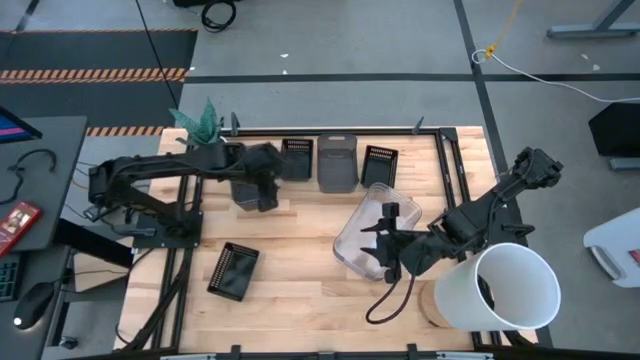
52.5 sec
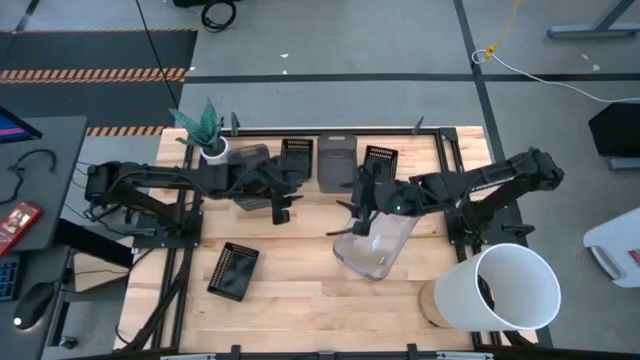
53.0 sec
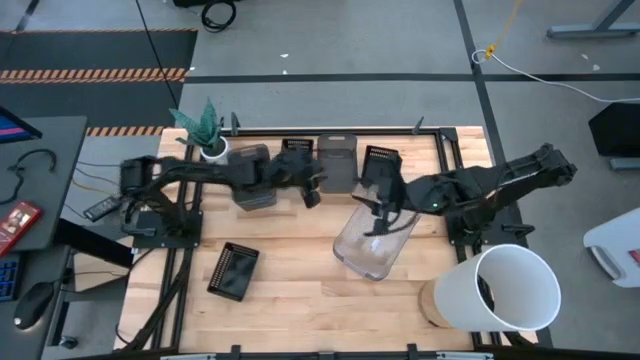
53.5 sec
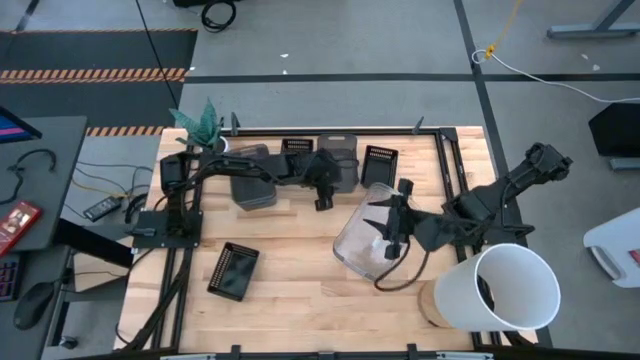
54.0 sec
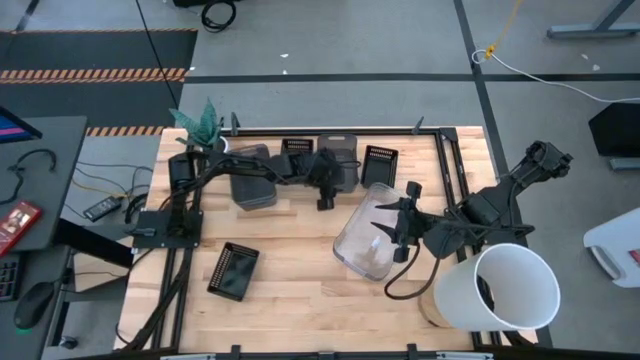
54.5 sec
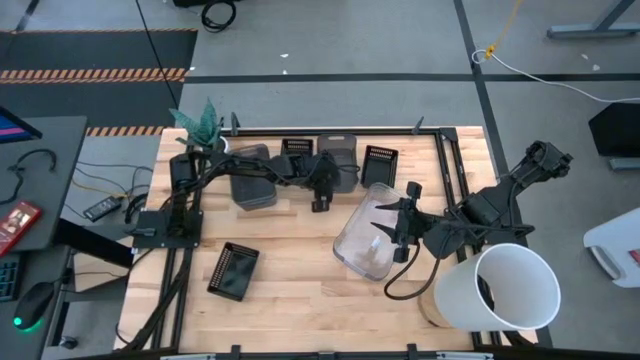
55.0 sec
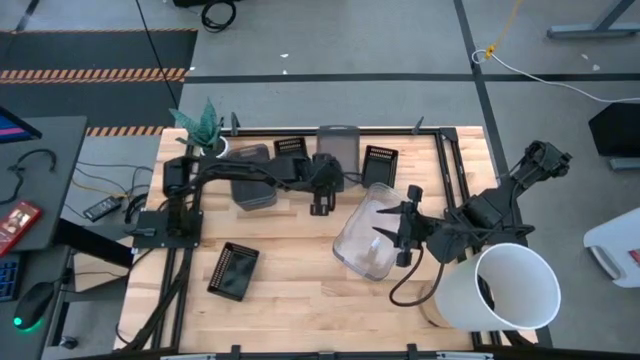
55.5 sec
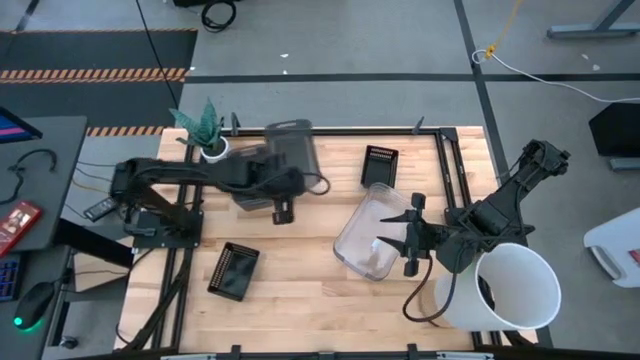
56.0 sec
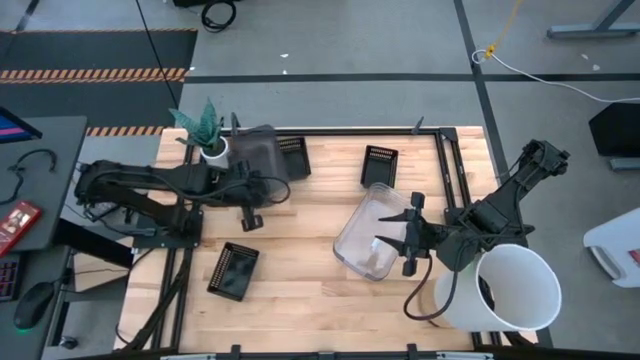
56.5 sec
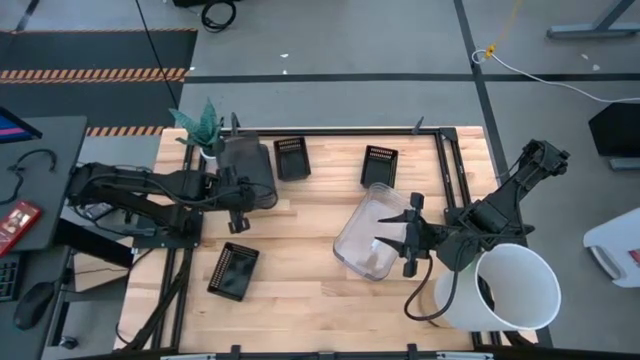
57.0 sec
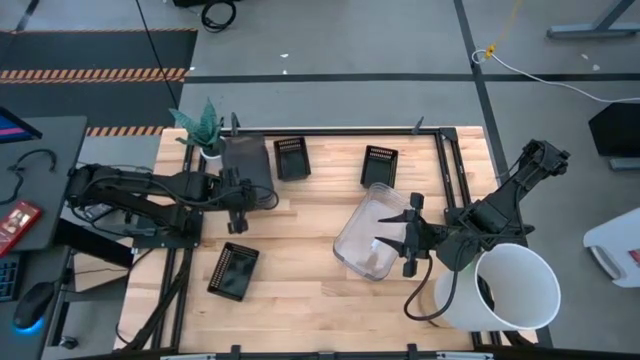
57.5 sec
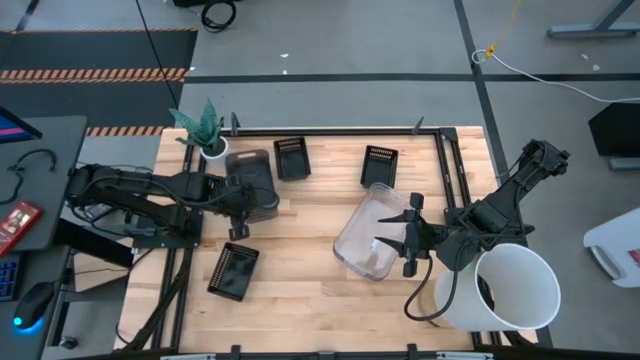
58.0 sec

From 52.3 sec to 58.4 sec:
Stack the right gray bin on the left stacked gray bins

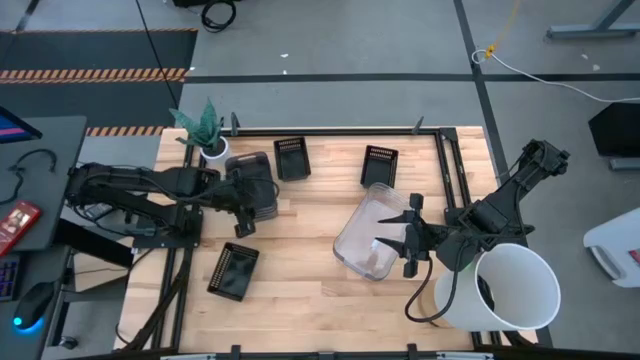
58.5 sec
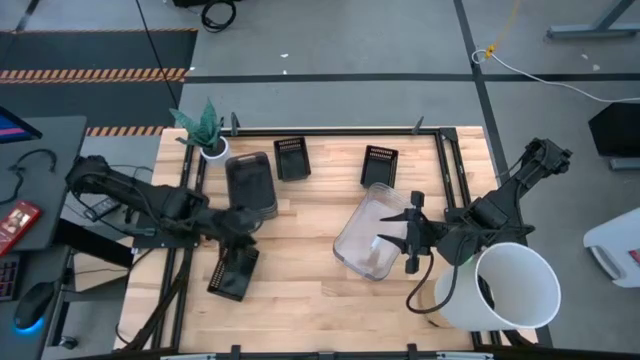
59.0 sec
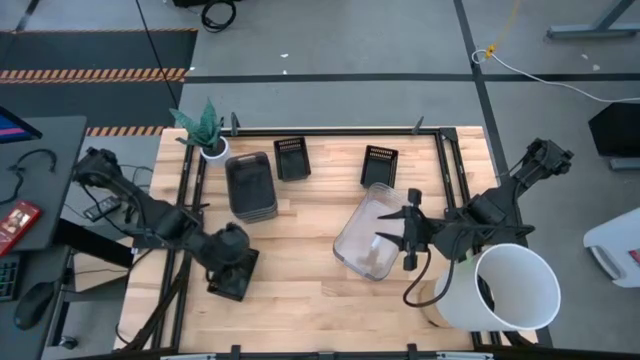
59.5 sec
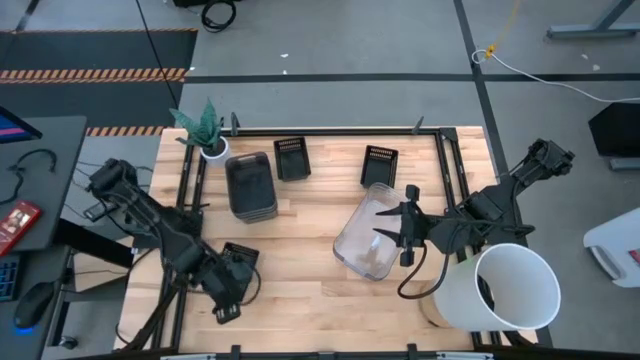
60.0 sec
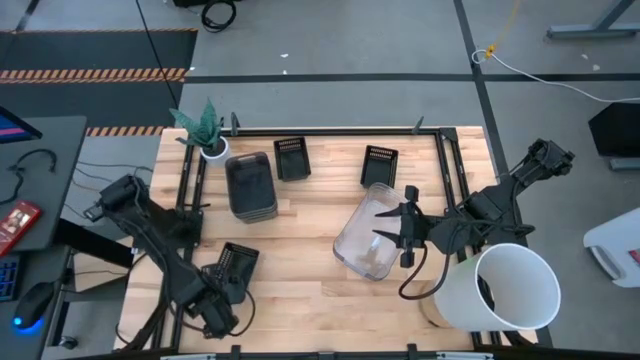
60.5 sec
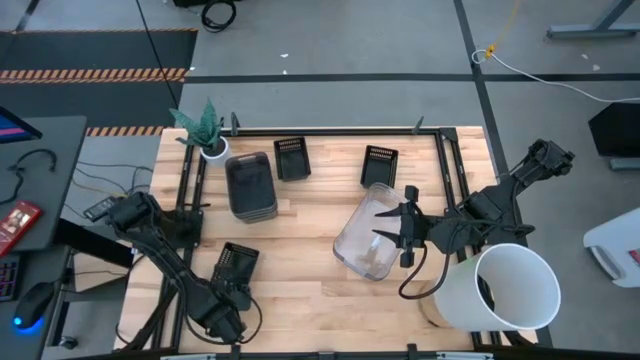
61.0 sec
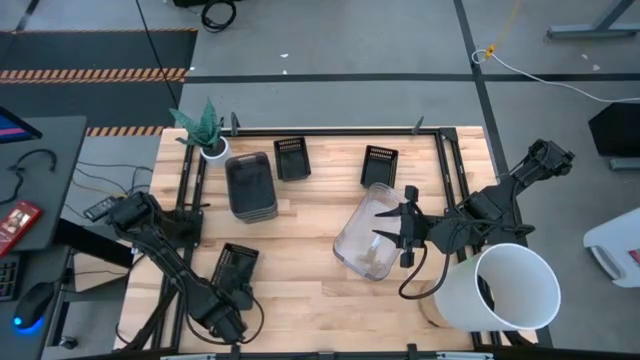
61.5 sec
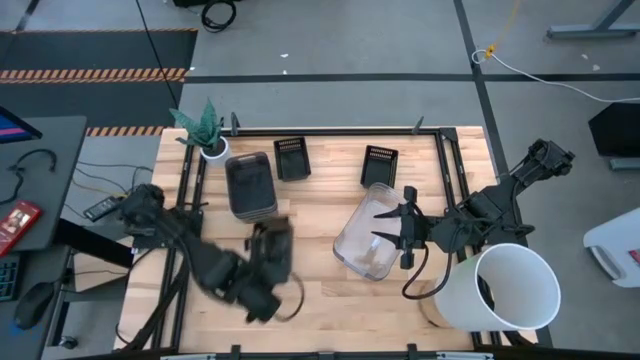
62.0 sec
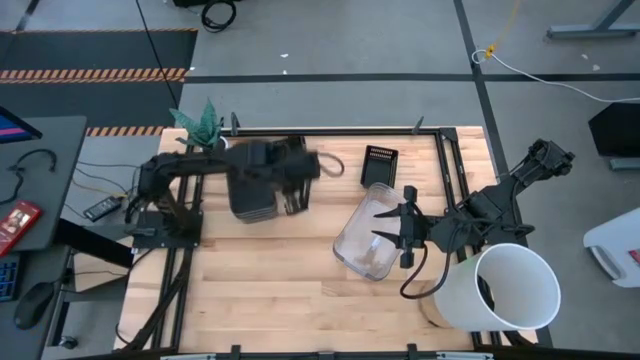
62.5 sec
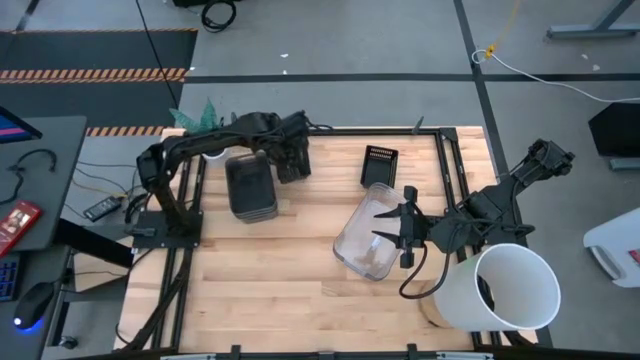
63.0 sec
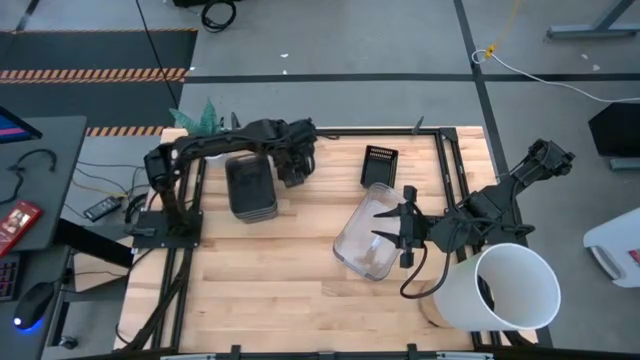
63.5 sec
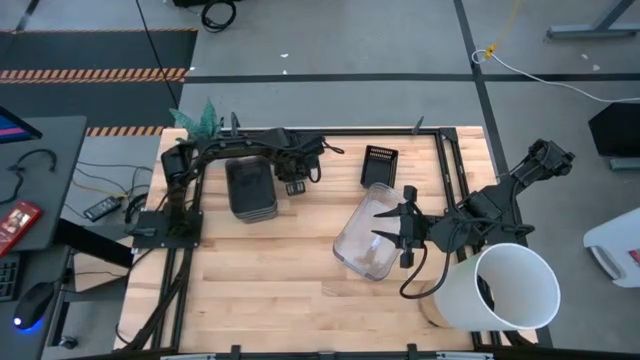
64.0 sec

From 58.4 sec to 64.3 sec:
Stack the bottom left black bin on the top left black bin
